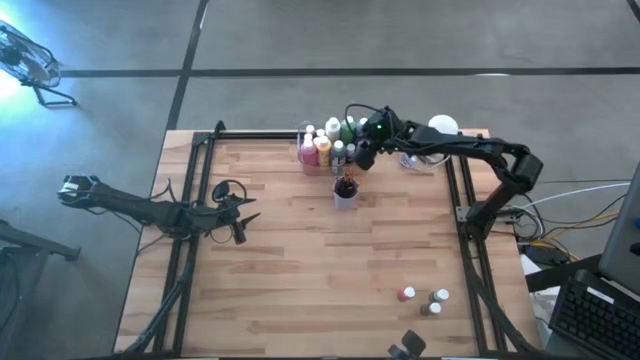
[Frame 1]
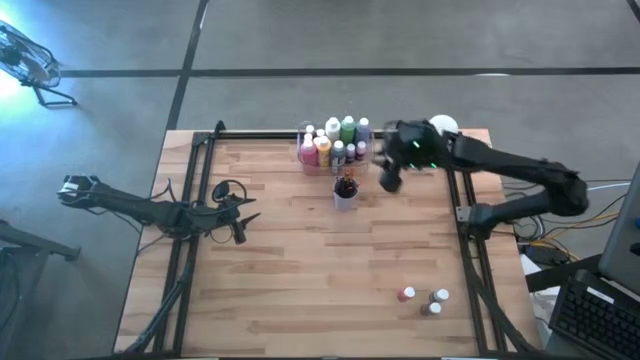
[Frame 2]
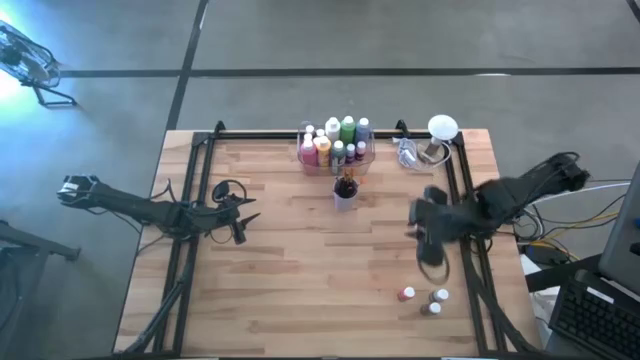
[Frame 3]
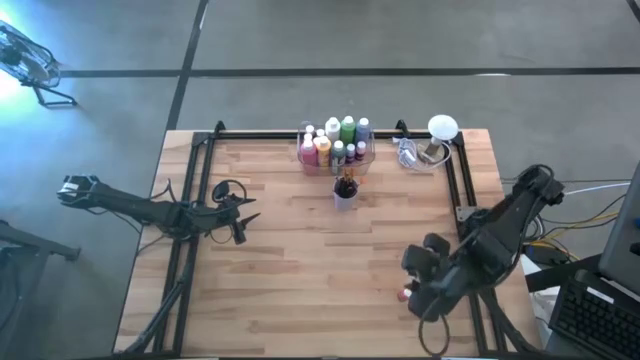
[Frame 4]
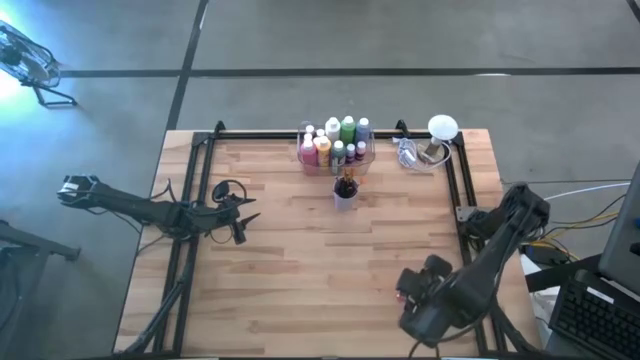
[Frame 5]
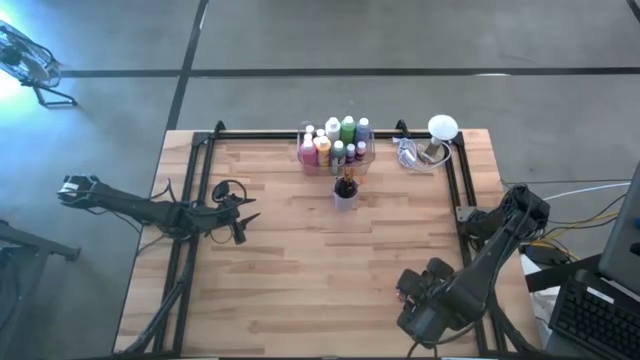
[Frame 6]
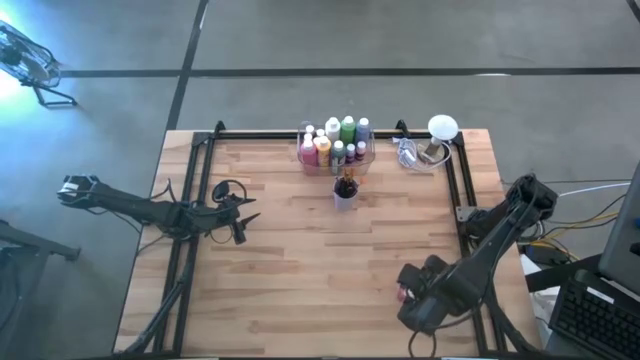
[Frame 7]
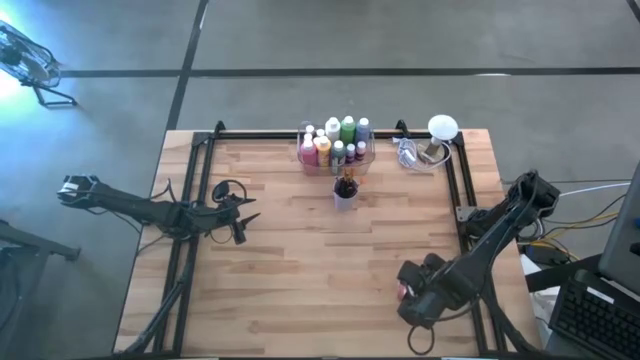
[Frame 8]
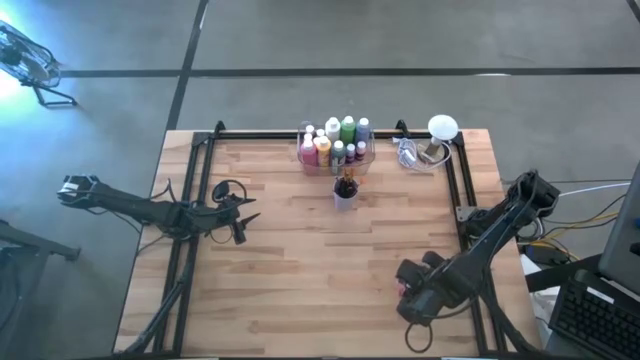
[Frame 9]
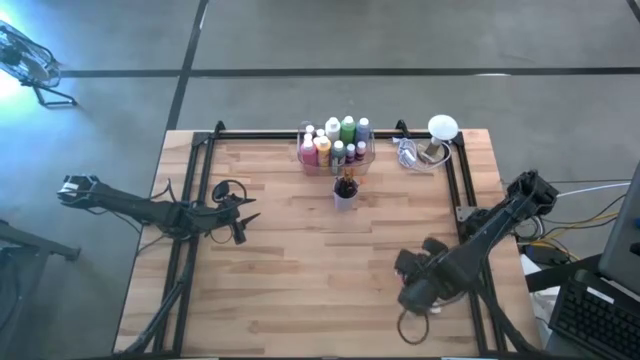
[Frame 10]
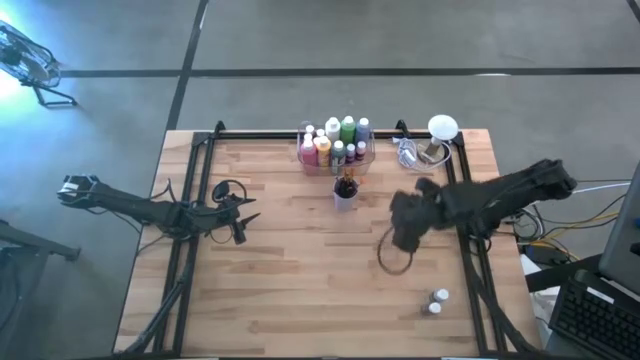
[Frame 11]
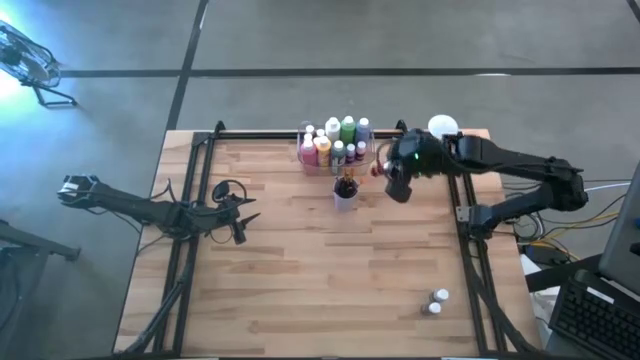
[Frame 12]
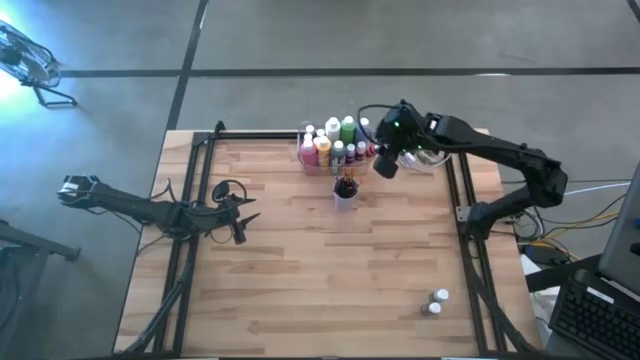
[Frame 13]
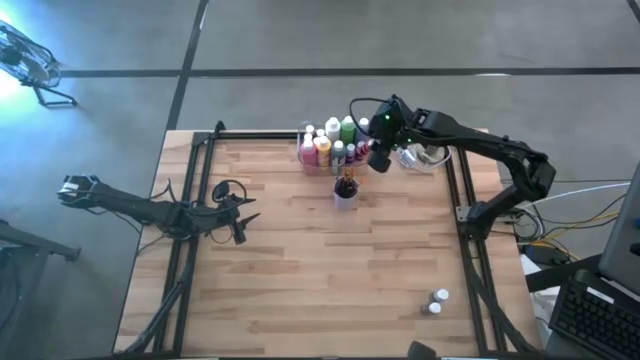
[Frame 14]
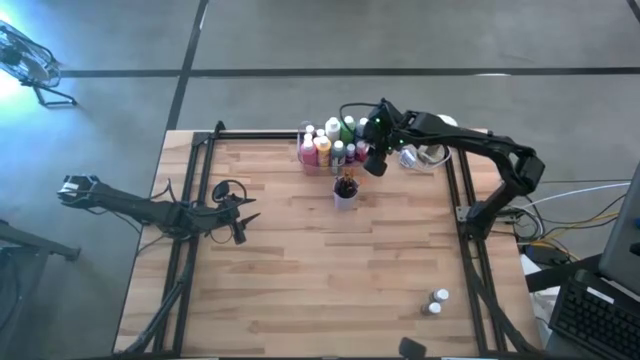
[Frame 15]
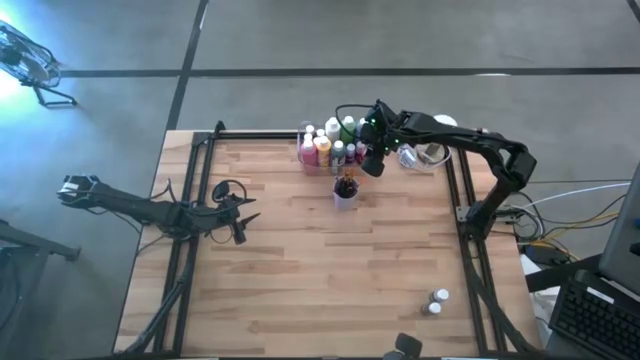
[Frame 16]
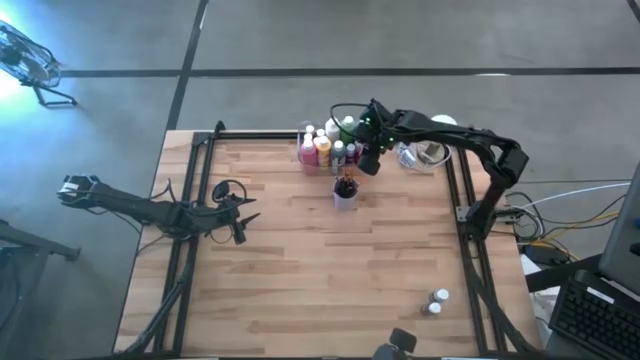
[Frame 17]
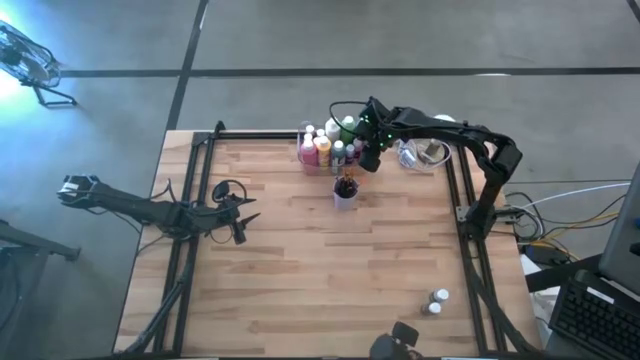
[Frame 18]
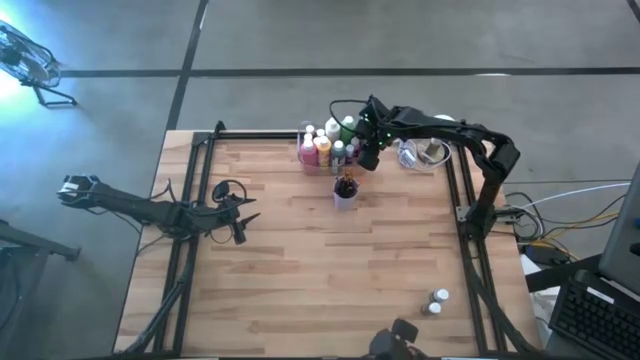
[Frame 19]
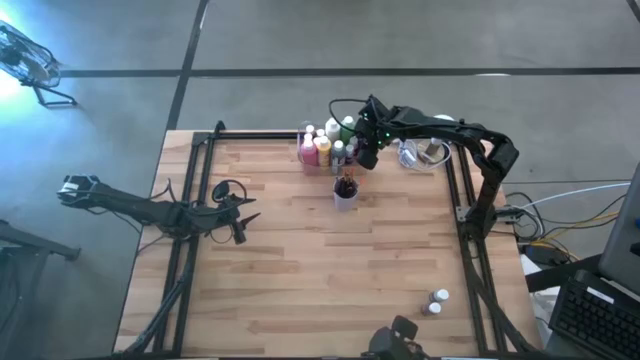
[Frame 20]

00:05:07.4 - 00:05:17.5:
Task: Pick & Place Paint Supplies
Put the orange black paint bottle into the transparent bin

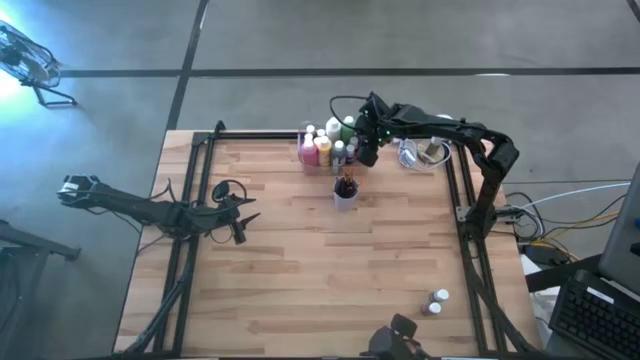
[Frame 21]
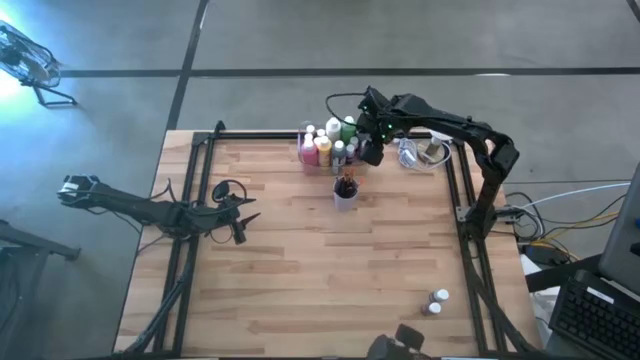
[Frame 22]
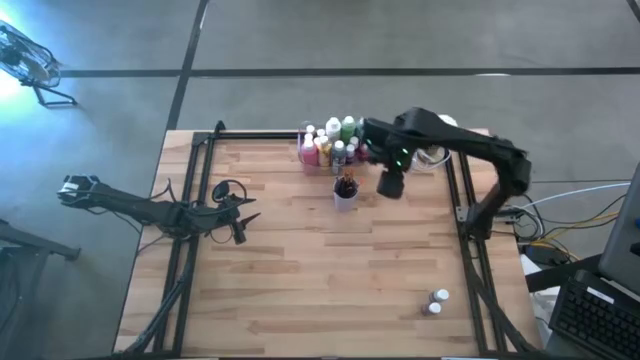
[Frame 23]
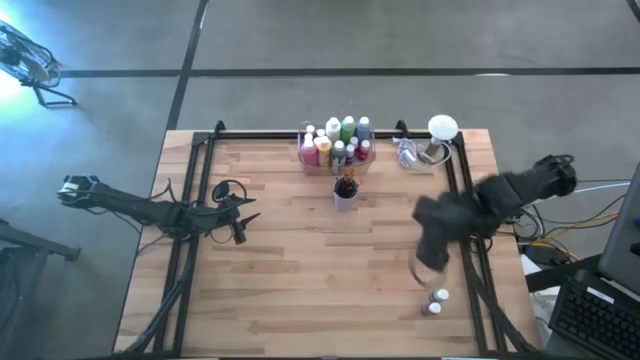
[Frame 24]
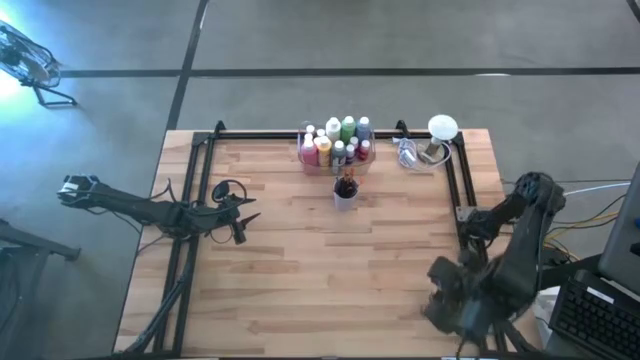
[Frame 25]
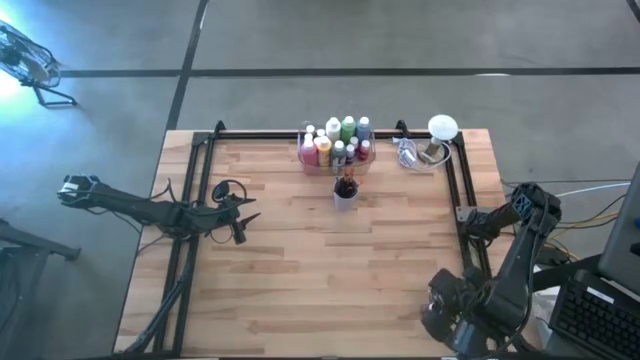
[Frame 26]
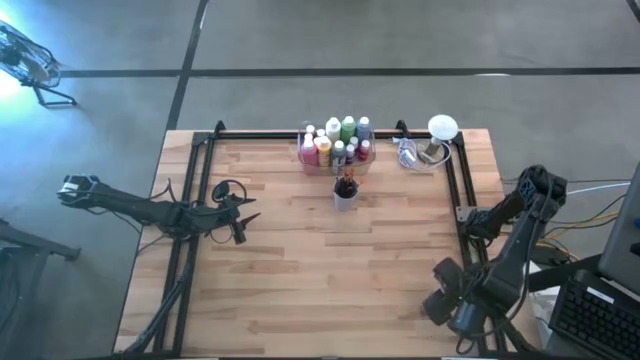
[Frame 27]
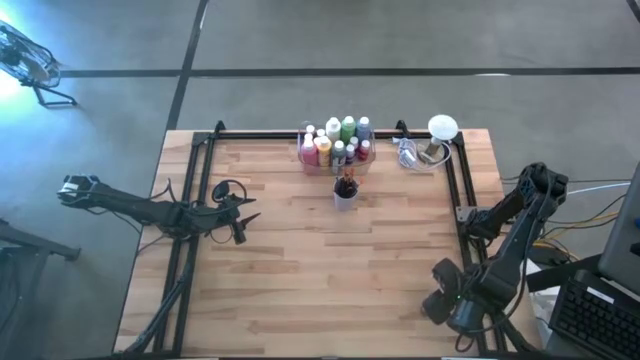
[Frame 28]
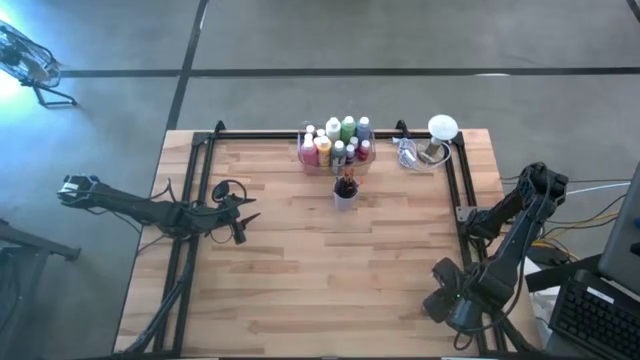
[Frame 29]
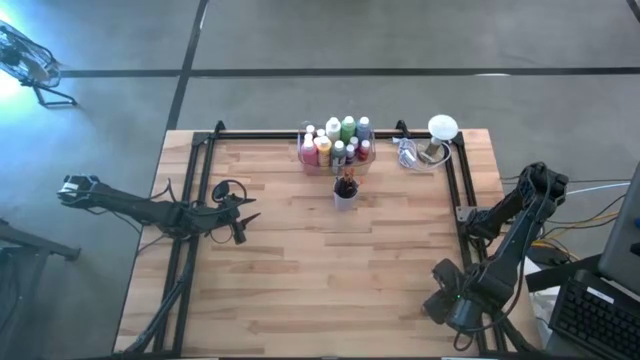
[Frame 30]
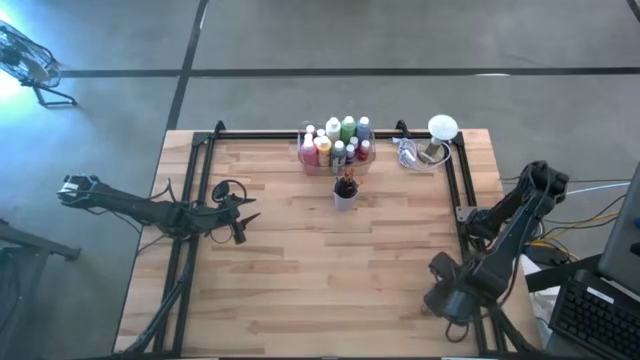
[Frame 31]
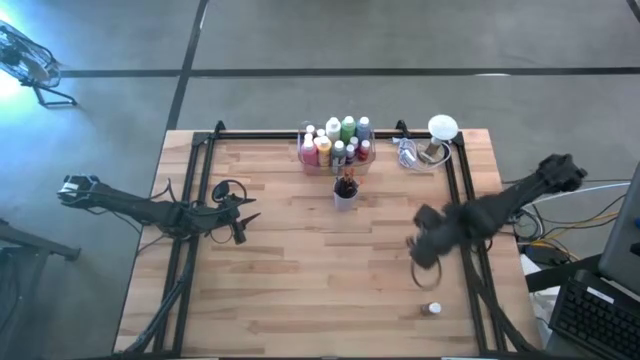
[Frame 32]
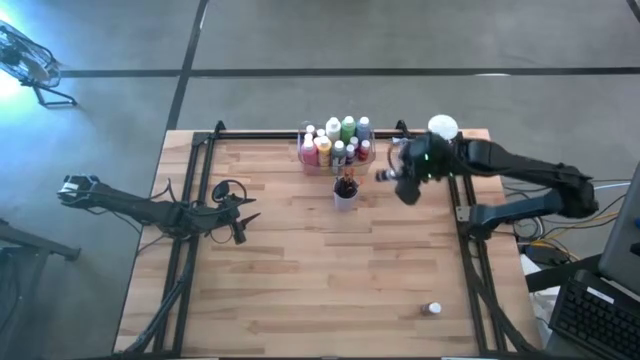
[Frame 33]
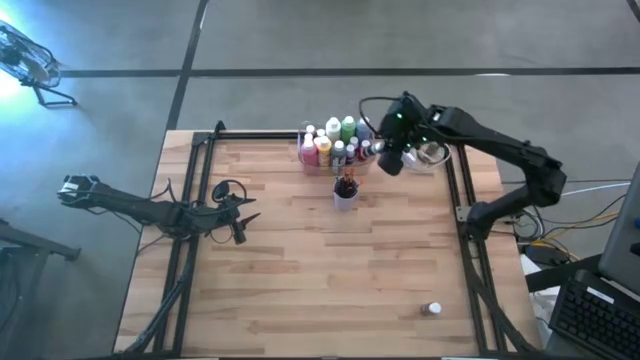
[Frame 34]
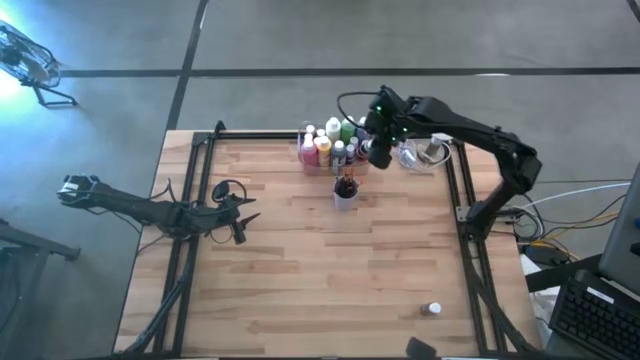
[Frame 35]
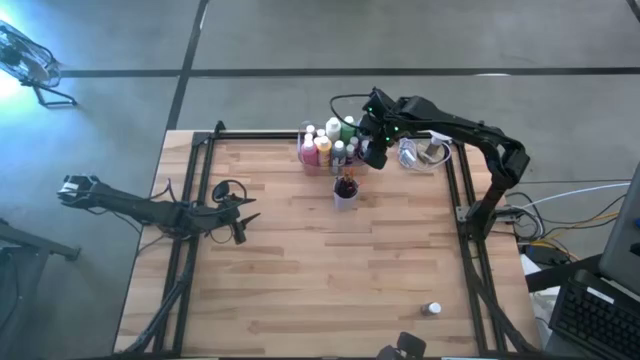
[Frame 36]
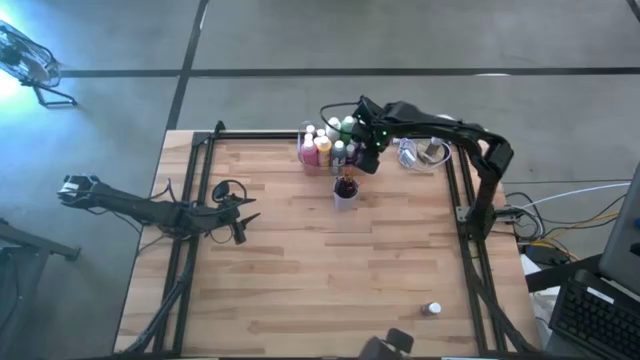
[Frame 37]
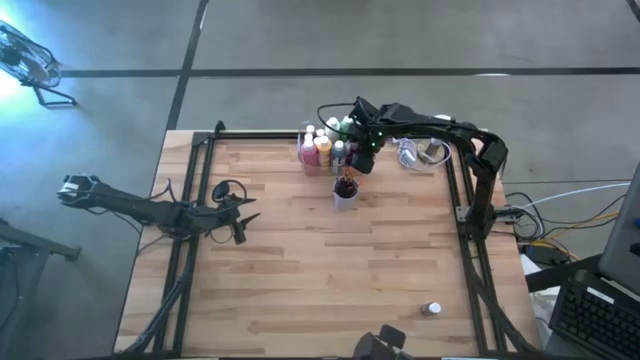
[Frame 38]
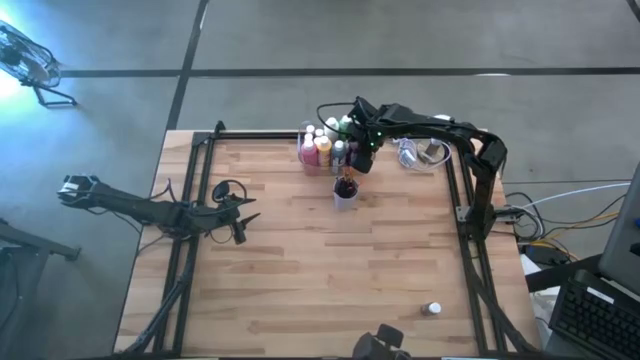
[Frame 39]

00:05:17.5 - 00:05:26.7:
Put the white black paint bottle into the transparent bin

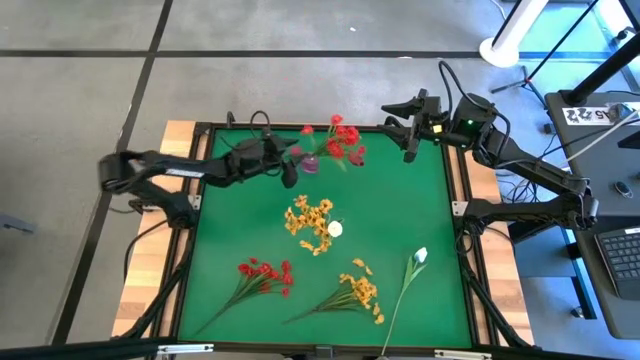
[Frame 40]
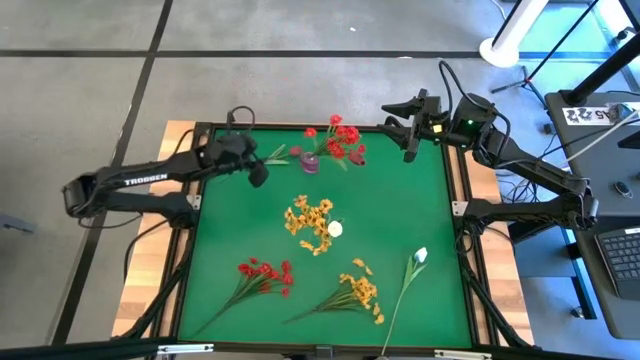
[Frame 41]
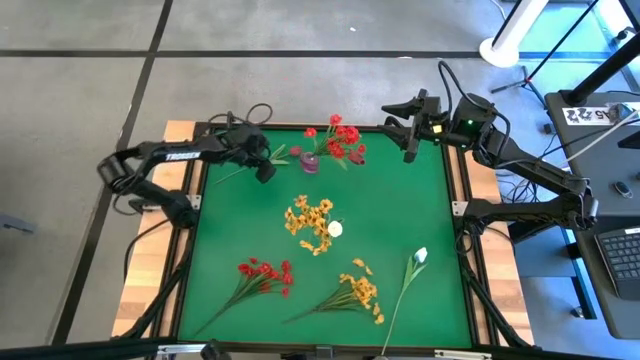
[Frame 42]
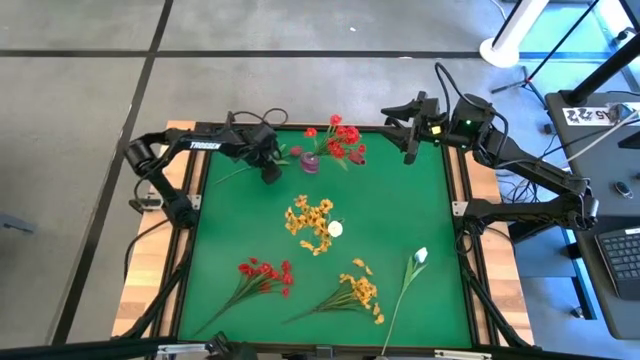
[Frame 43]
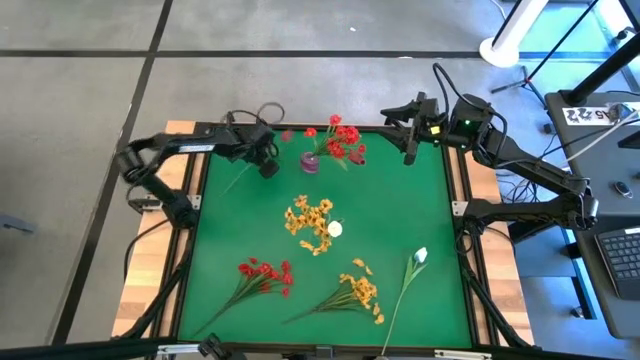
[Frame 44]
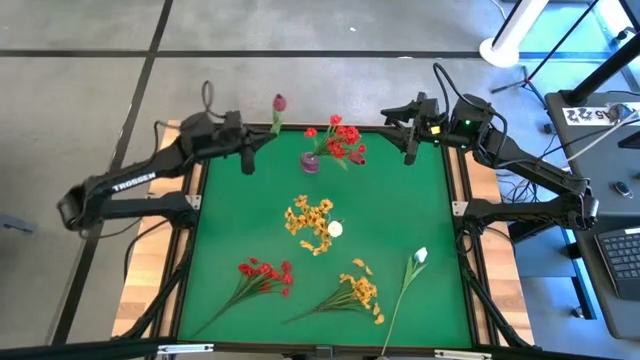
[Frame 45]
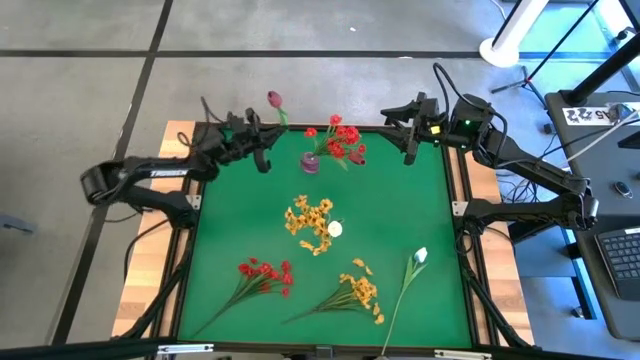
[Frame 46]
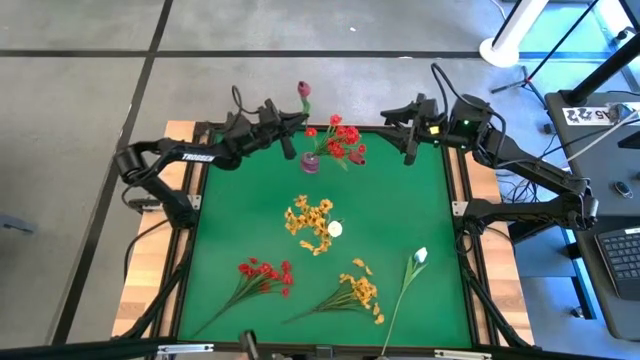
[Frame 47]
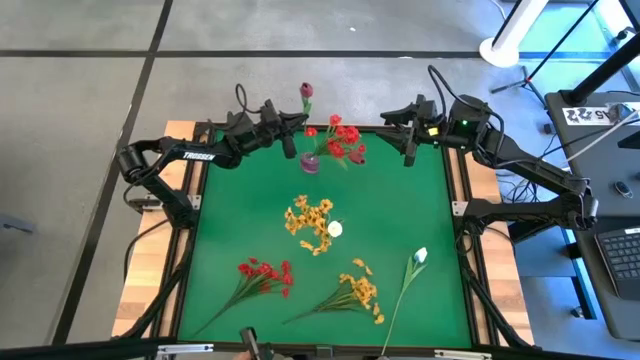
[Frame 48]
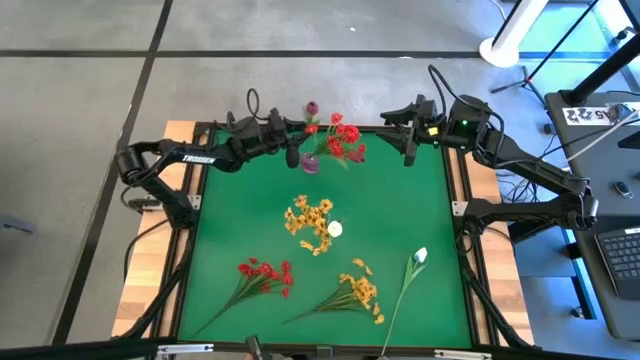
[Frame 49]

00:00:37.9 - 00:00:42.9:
Task: Sort flowers into vase by color
Put the dark red flower into the purple vase
